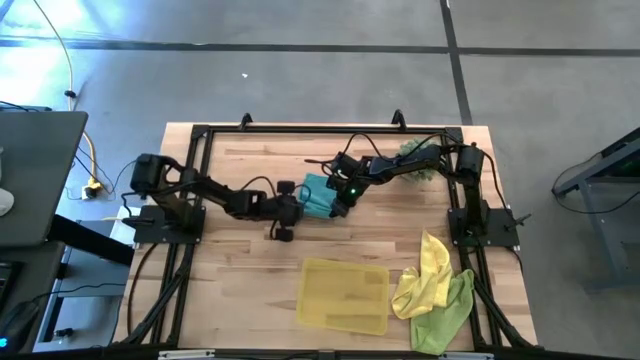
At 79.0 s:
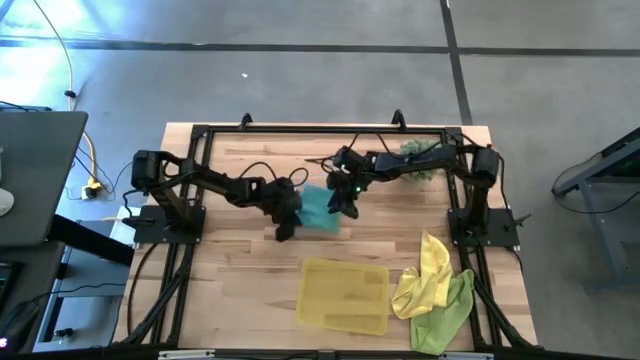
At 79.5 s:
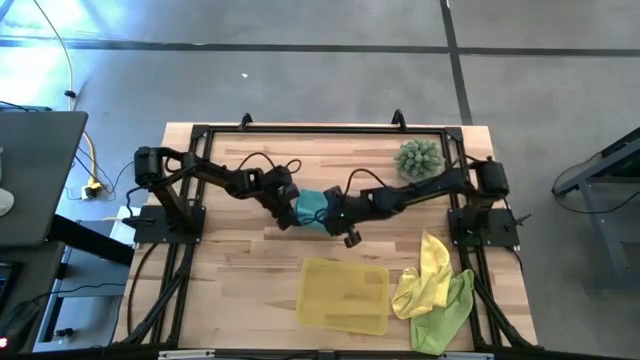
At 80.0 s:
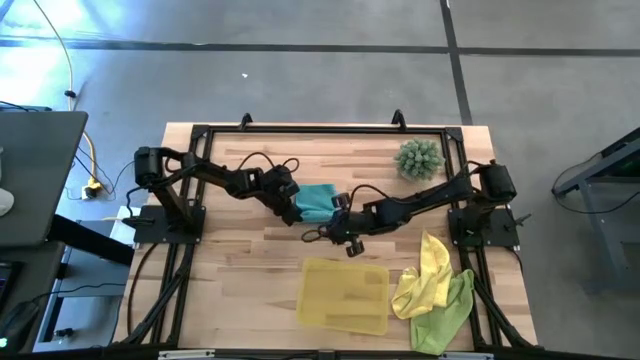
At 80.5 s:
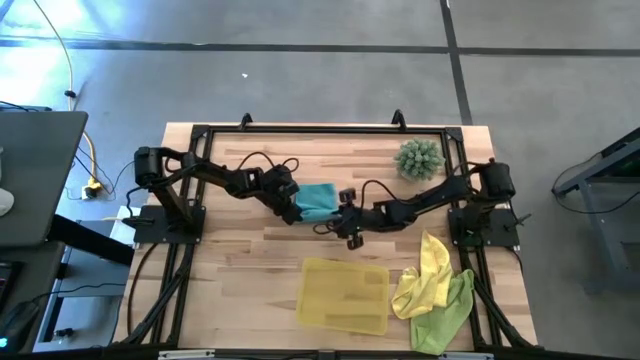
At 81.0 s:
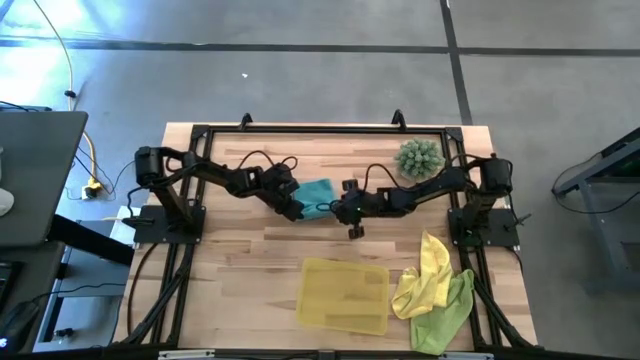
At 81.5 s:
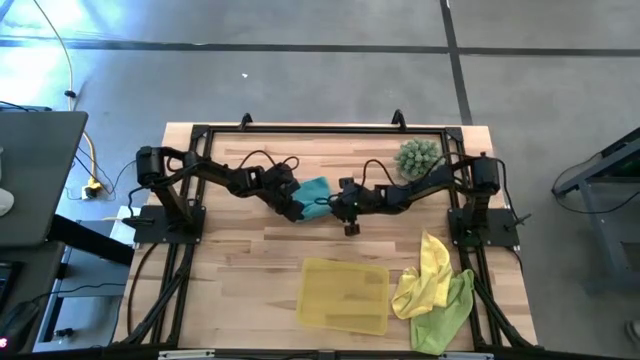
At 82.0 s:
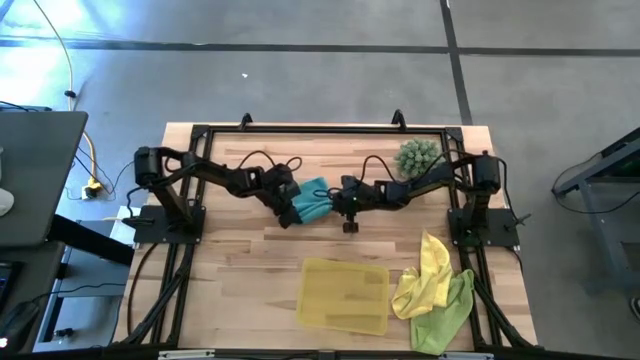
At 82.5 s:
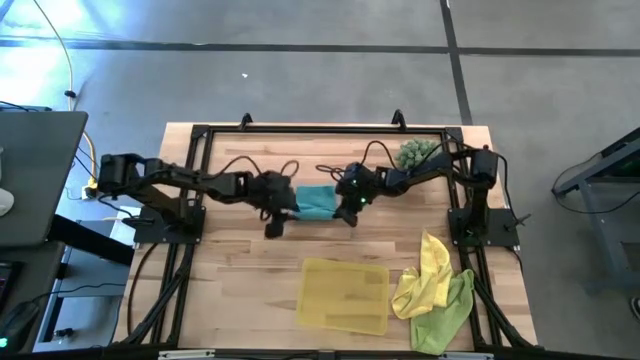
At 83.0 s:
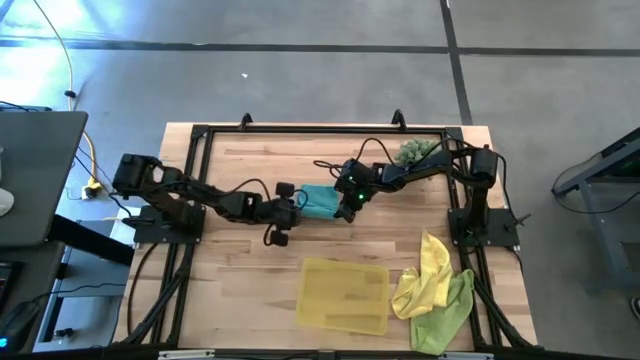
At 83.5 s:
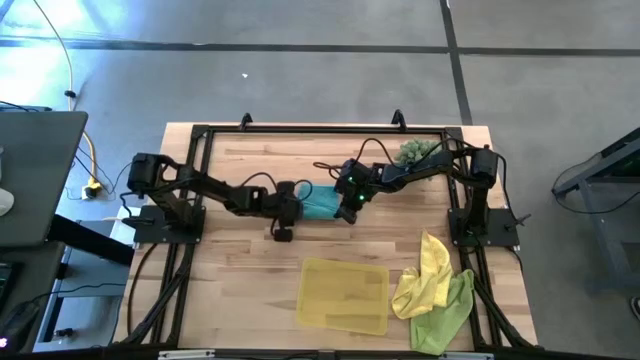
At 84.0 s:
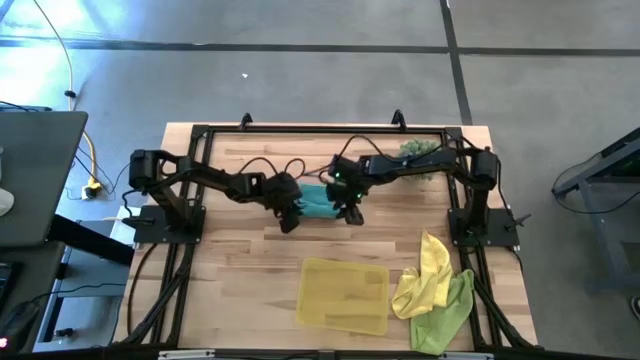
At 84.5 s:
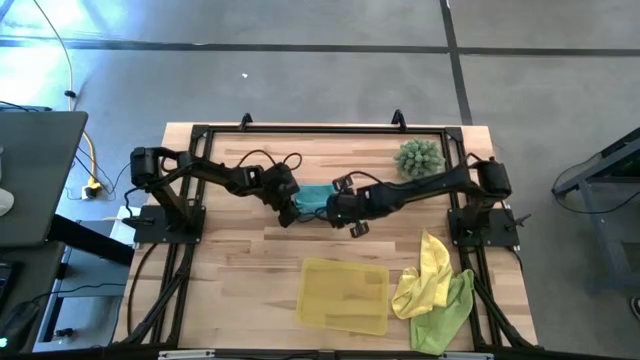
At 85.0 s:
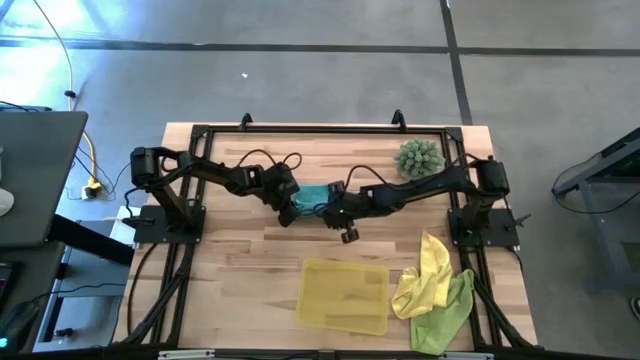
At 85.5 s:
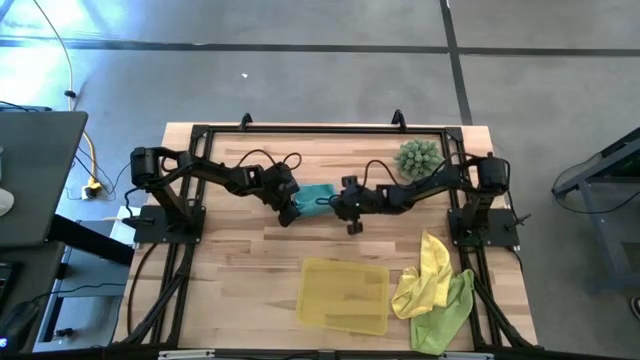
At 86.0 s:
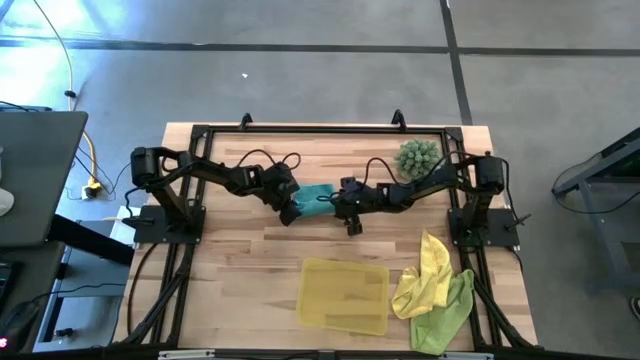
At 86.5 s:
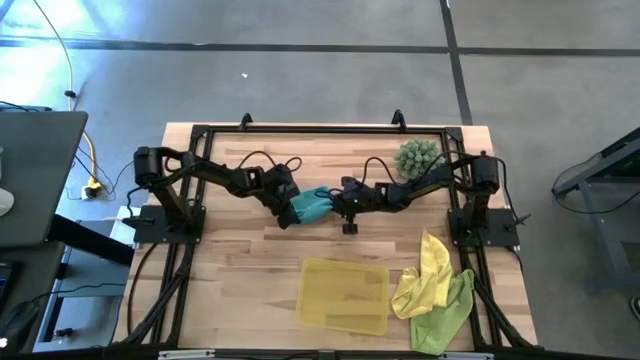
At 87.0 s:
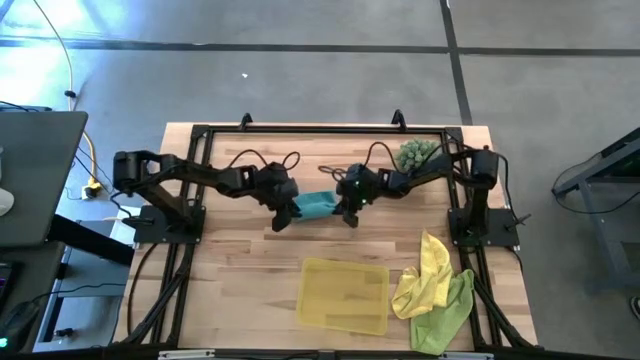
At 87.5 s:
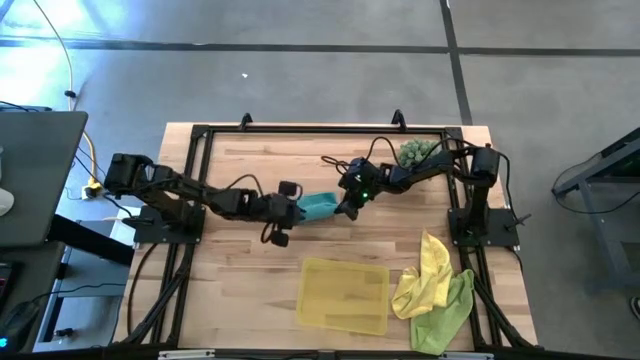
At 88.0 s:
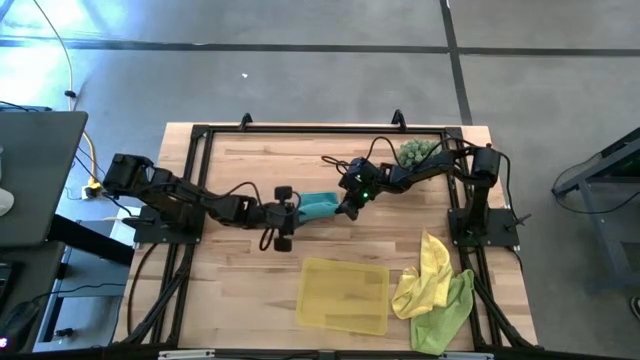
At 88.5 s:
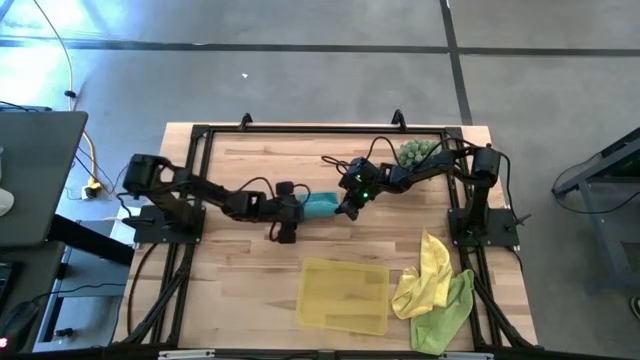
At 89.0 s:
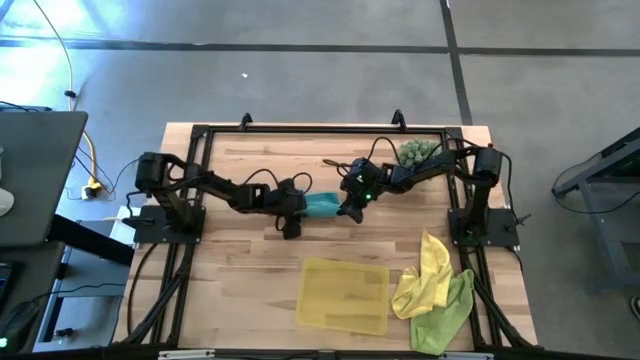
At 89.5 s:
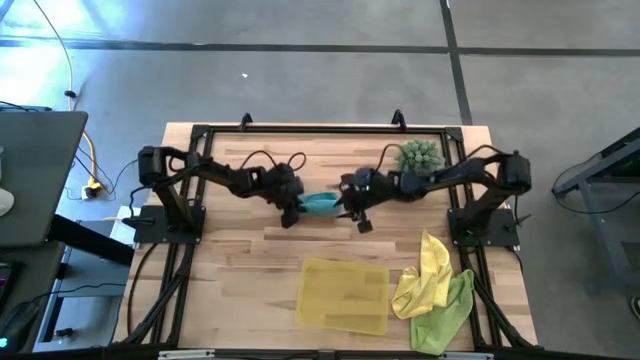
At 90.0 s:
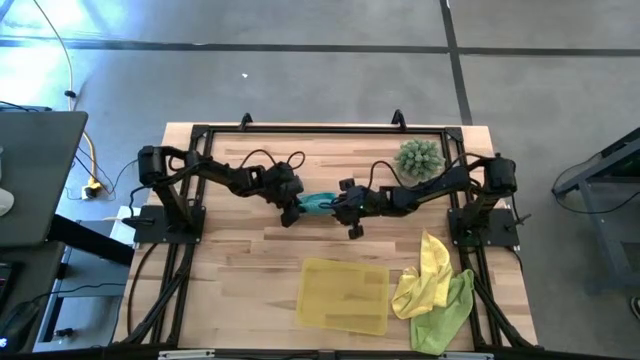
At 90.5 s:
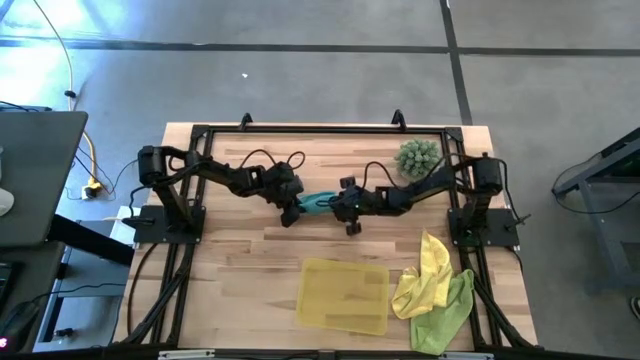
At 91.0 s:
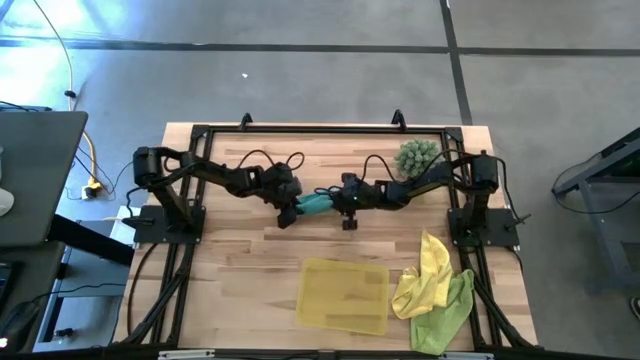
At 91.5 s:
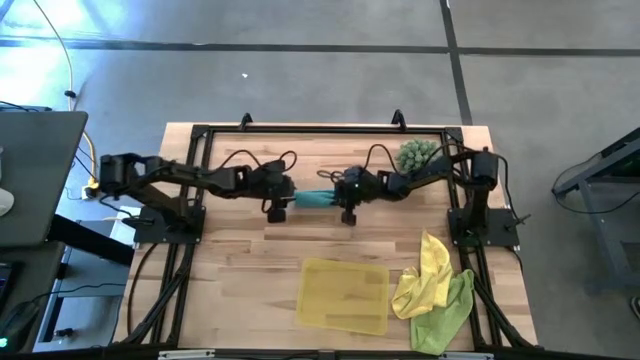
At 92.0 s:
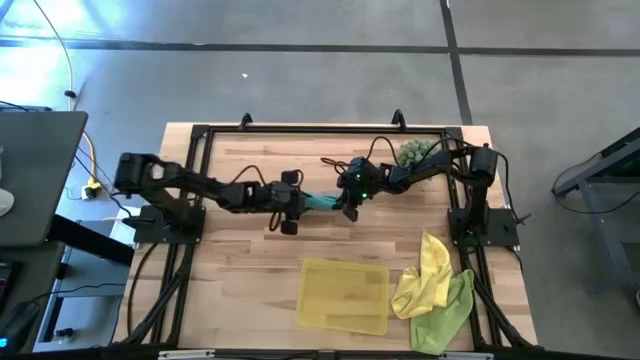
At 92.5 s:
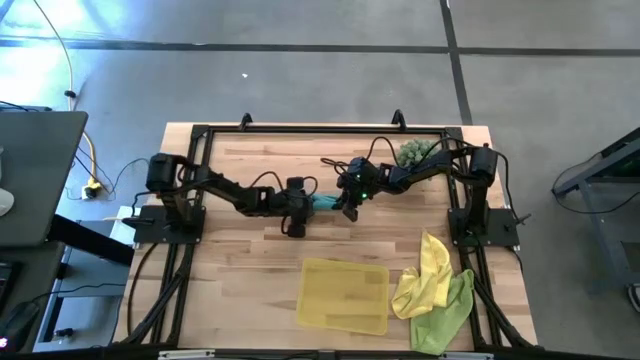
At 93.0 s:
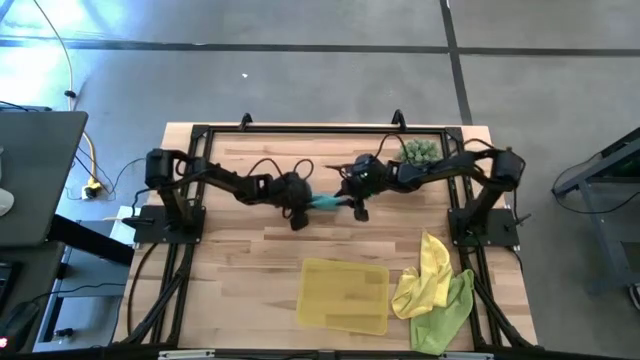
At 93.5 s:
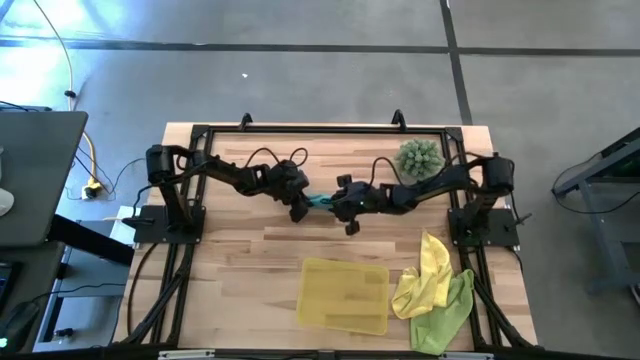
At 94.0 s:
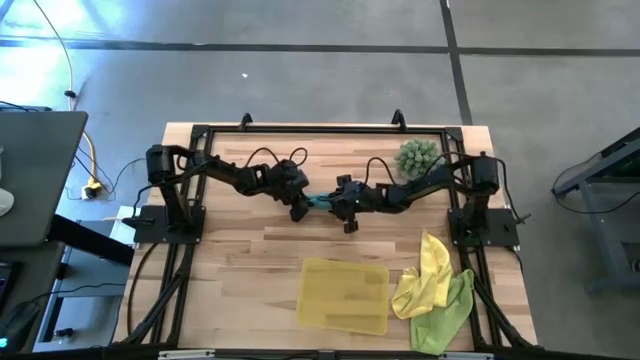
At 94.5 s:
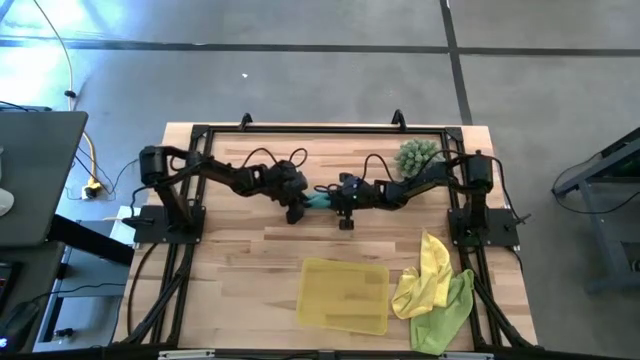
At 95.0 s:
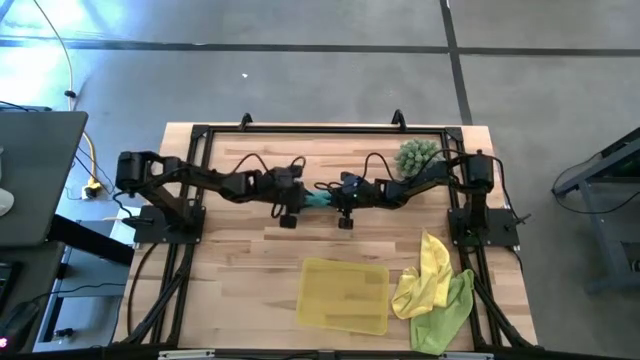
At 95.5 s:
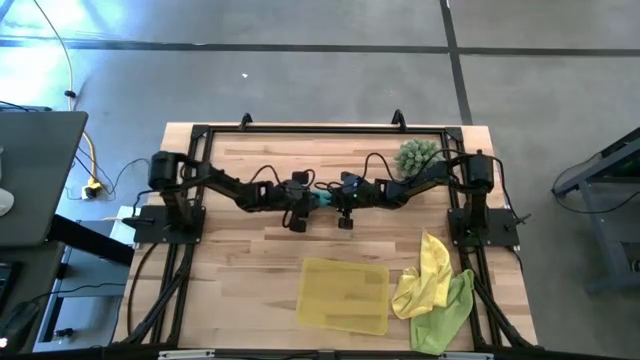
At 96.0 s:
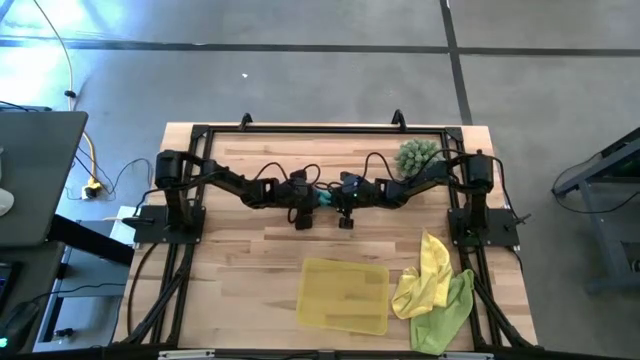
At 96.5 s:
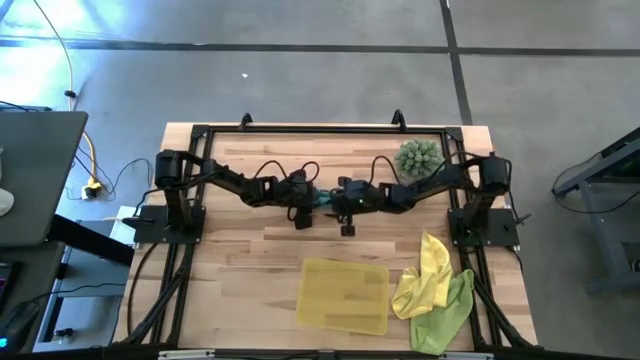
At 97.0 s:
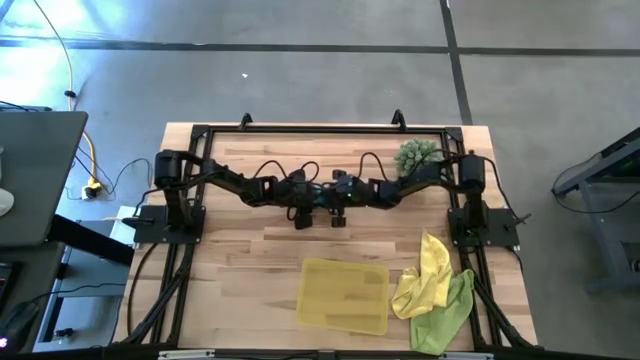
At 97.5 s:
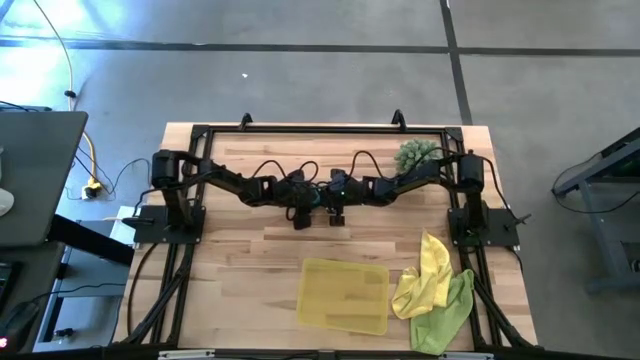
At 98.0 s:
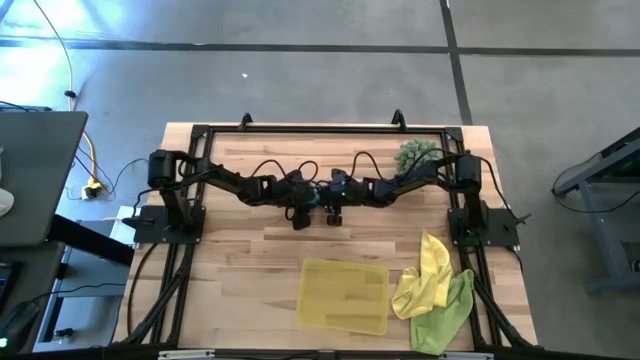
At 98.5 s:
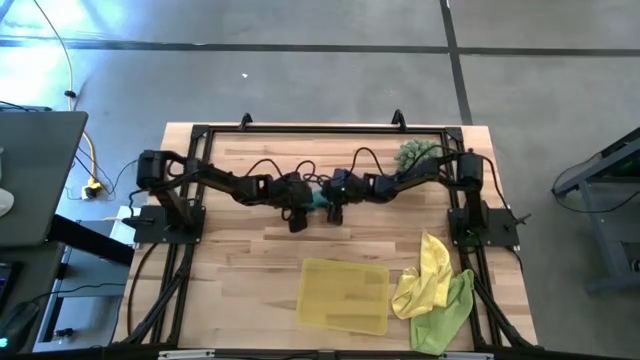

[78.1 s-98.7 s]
Task: Roll microfiber towels into tight, uniform cylinder then place into a basket
Roll the blue towel
